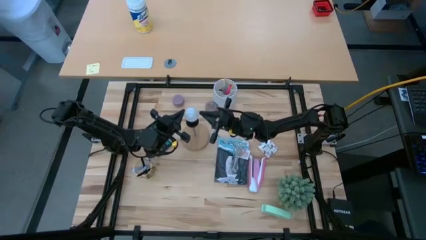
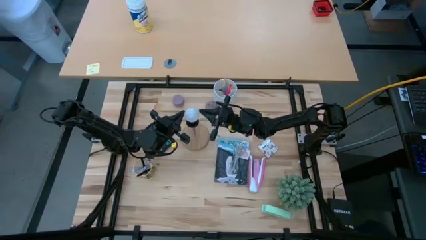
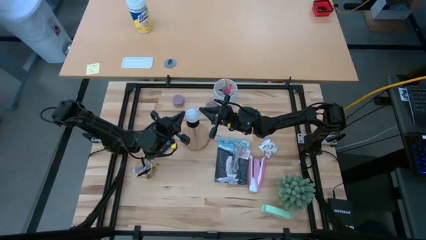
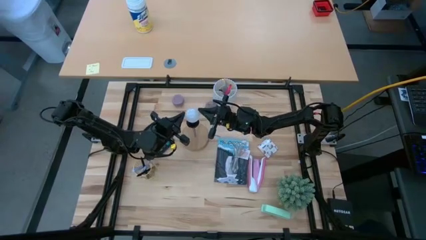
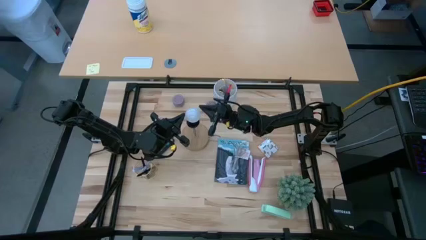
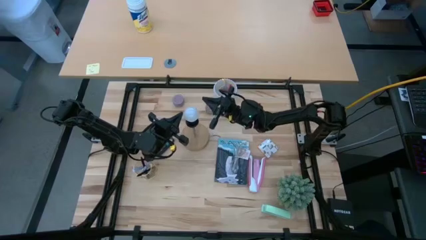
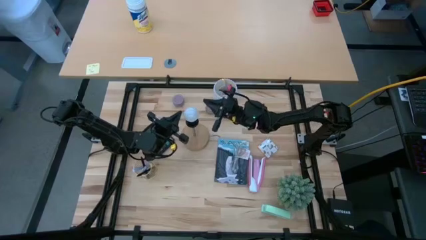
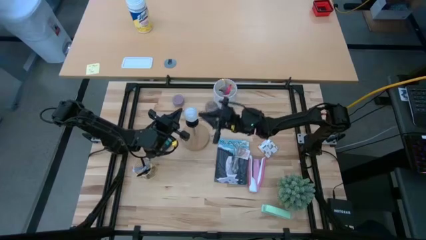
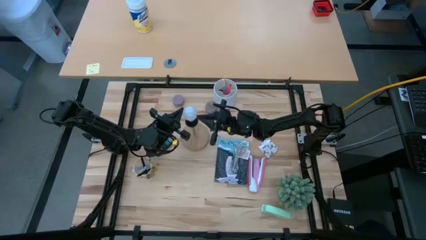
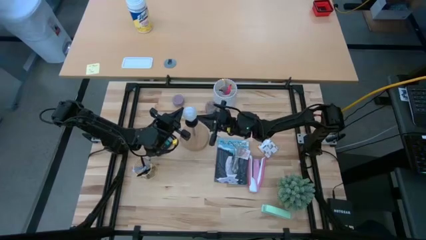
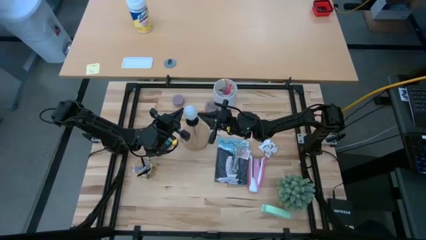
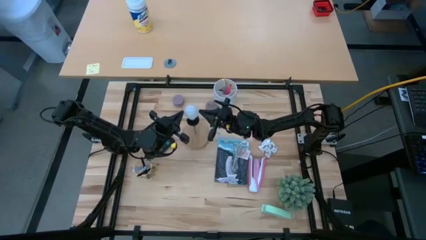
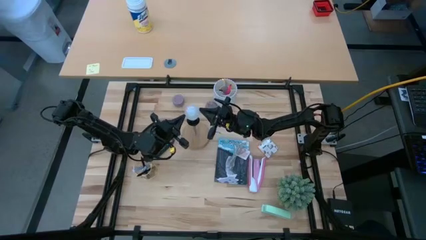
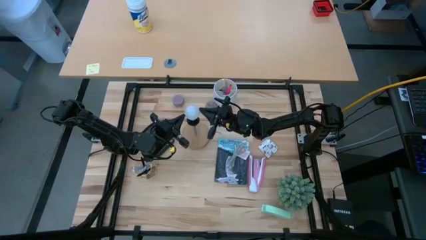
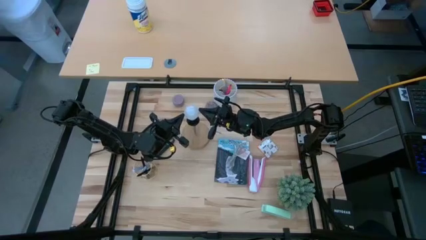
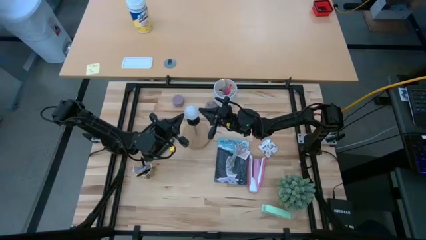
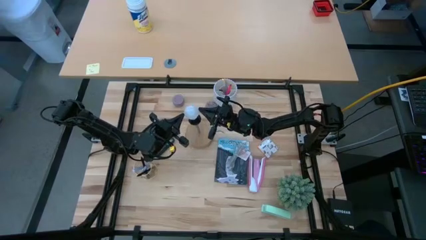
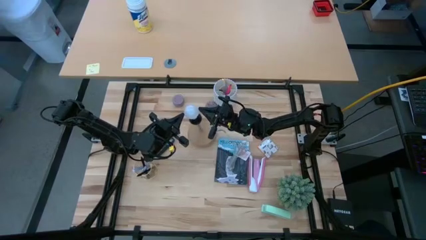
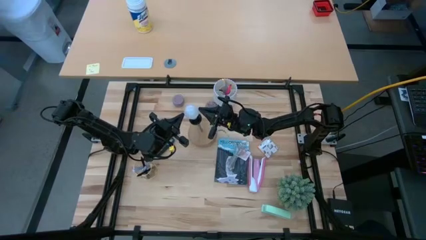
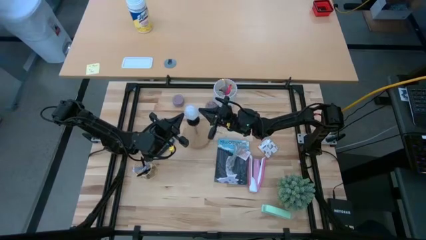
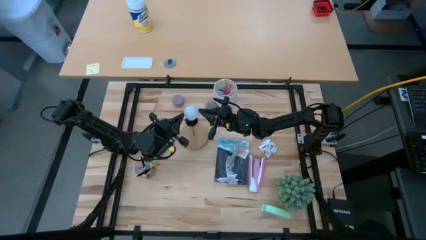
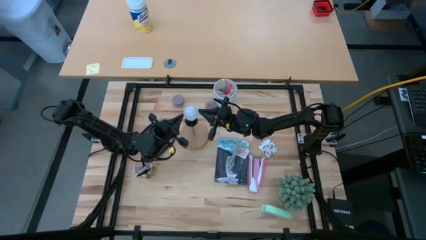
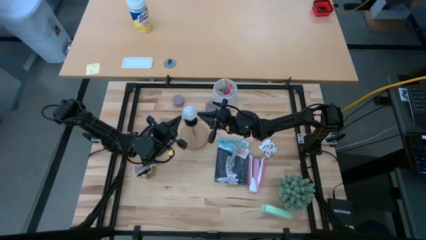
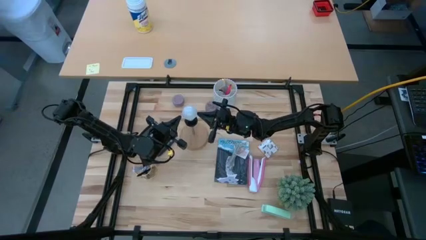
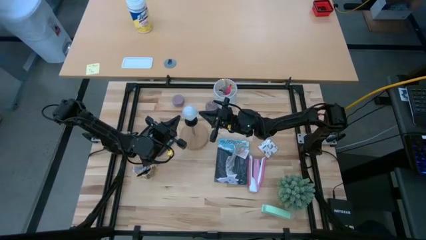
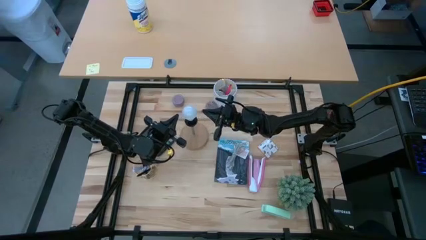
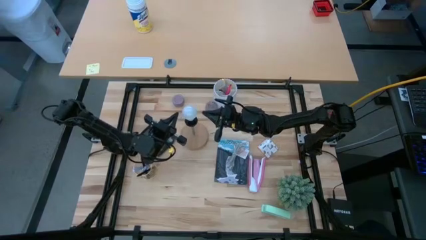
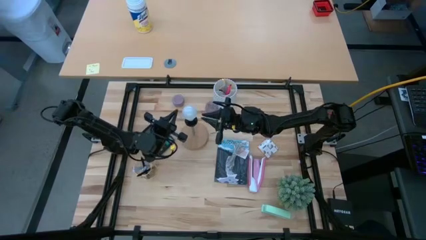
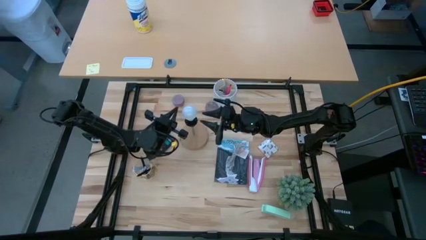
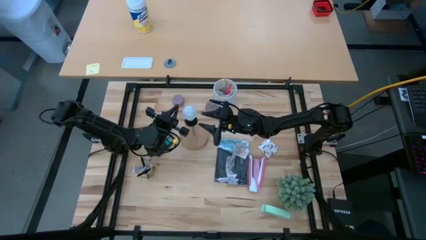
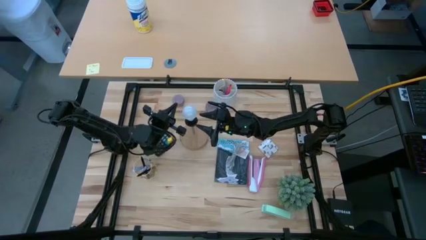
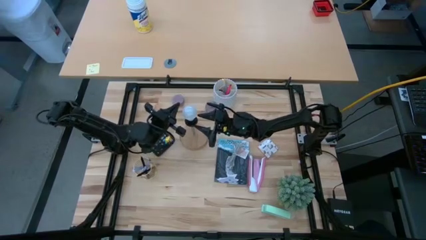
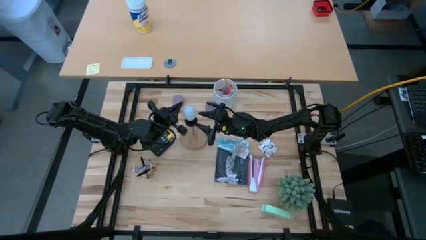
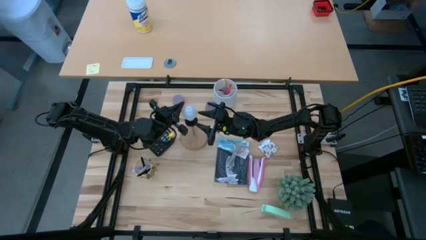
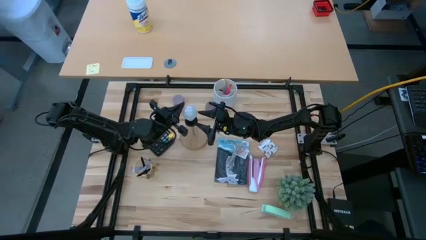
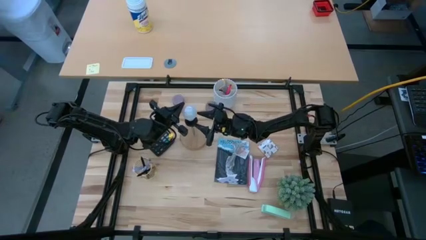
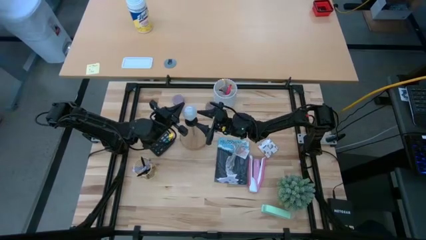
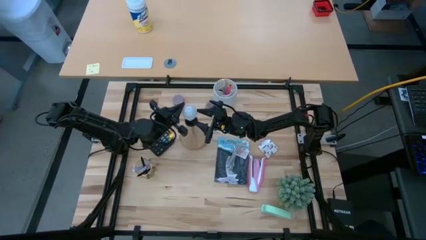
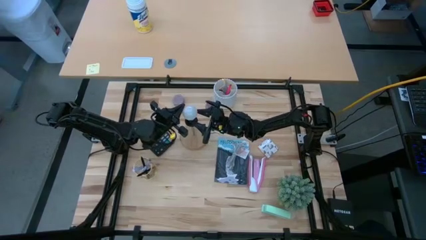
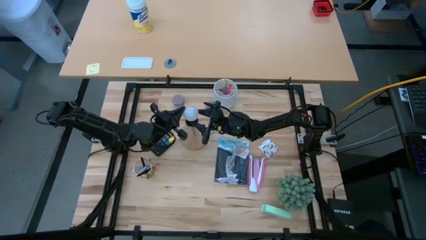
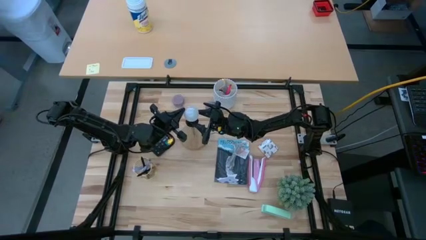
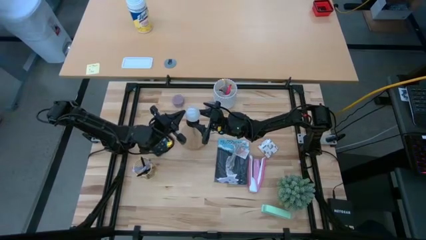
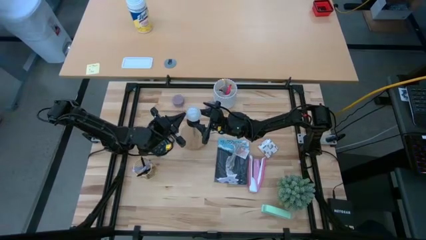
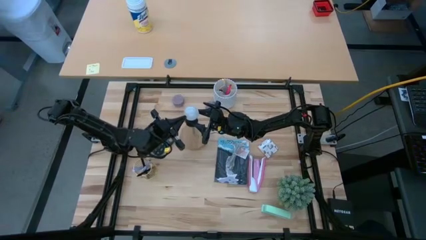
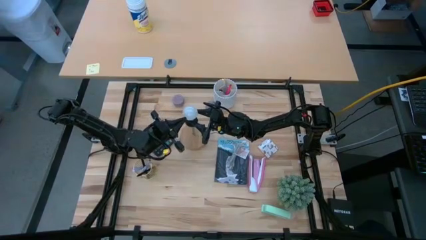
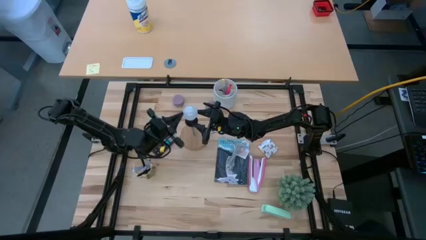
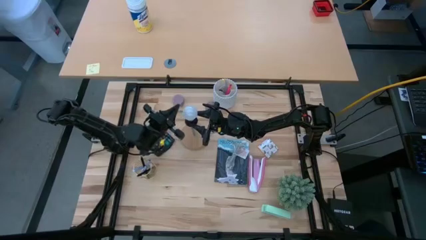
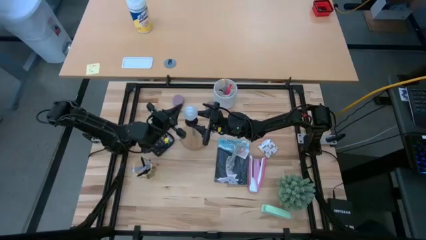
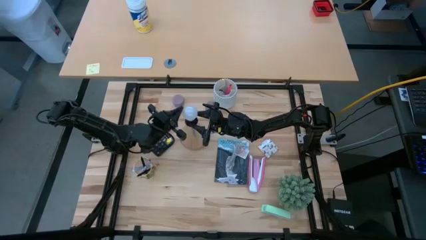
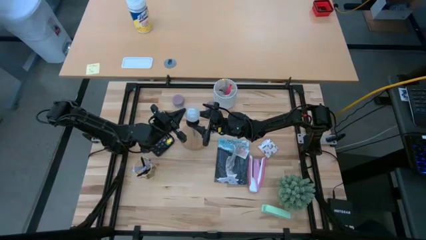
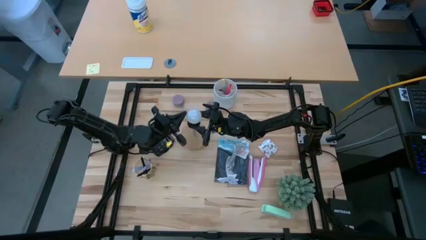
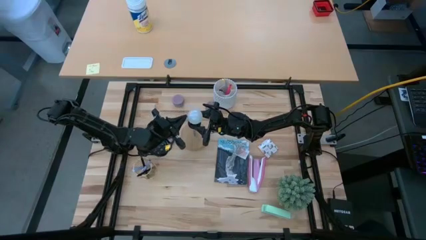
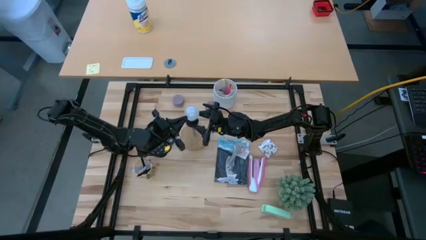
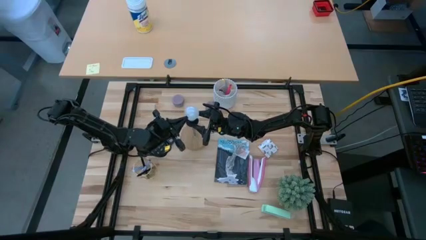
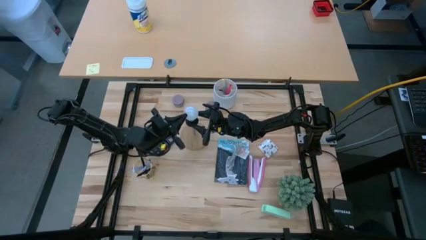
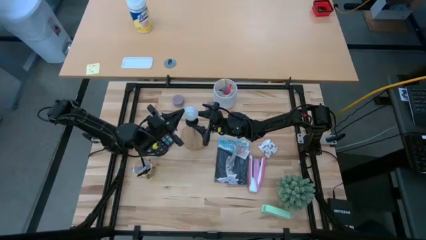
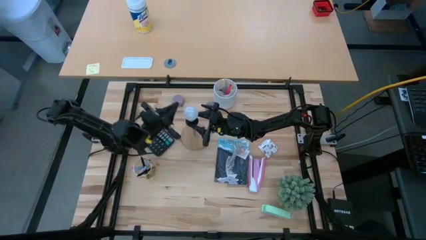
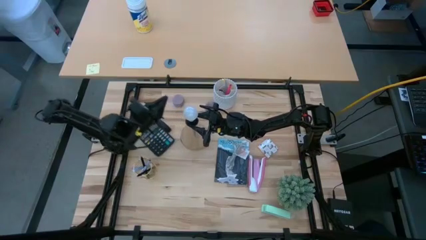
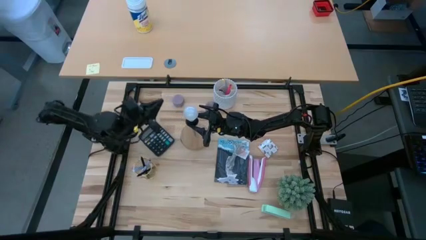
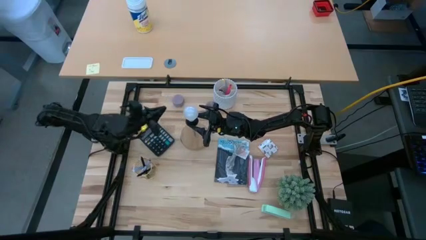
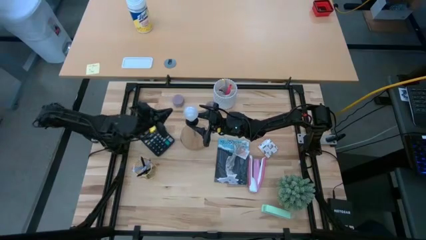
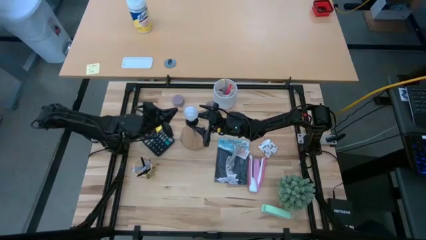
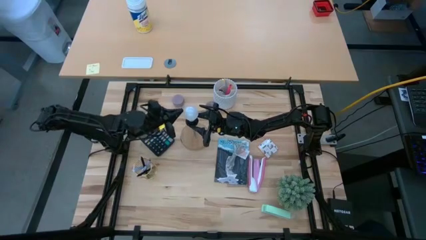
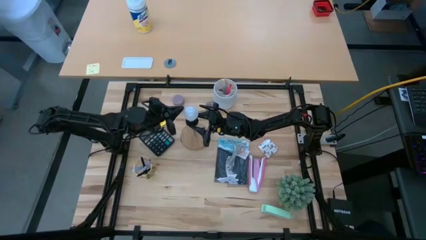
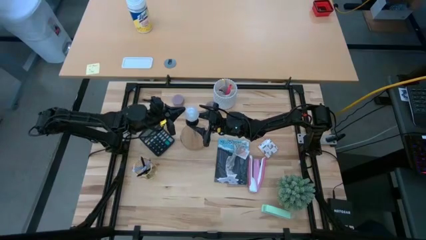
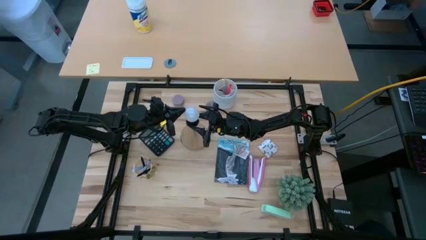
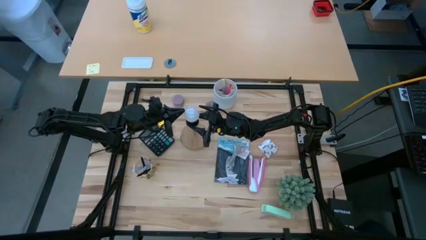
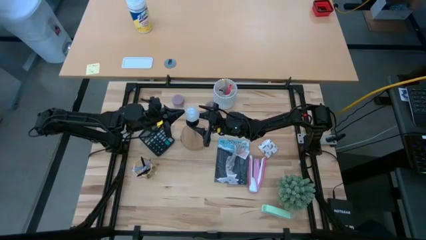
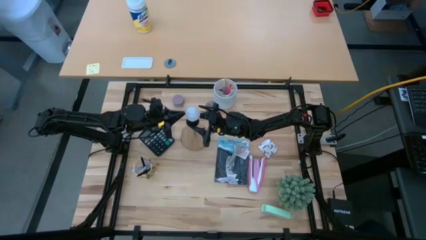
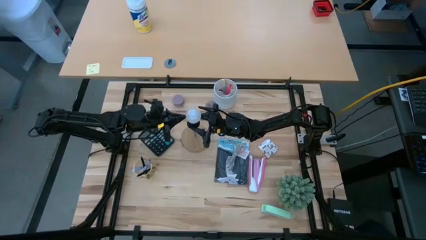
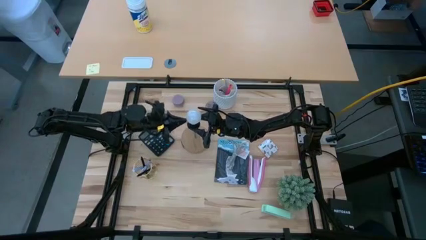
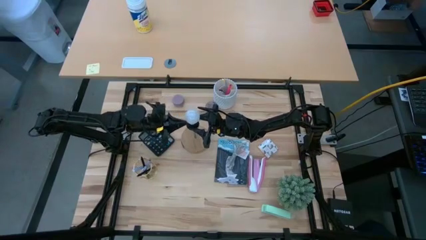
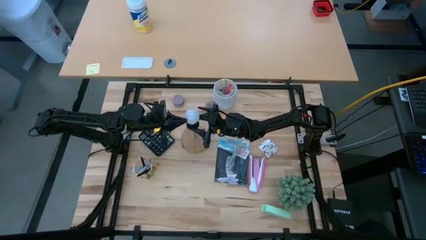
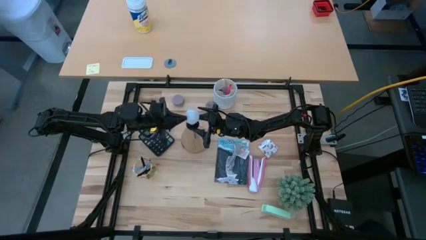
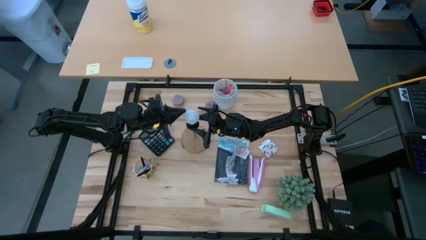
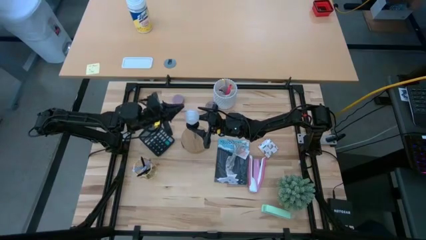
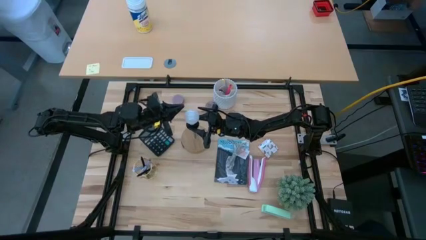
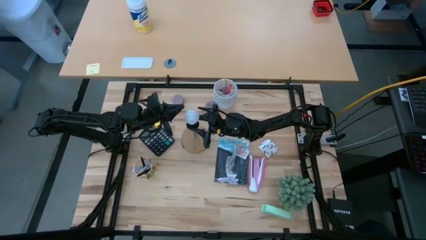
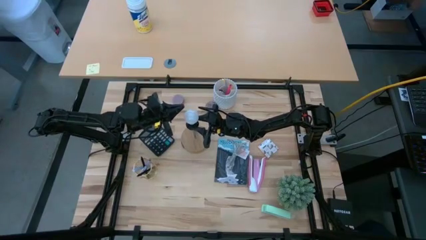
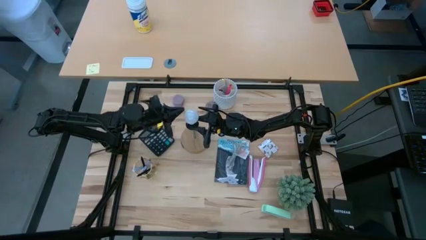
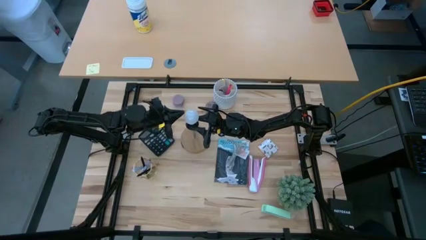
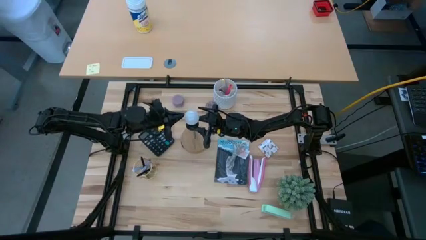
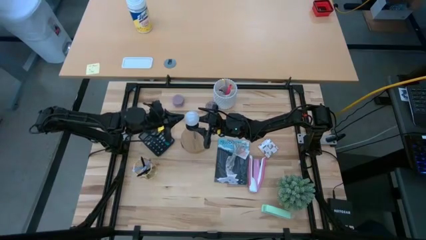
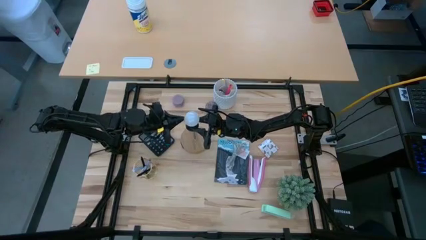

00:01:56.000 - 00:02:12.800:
Task: Screw lightbulb
Remove the lightbulb from the lamp
